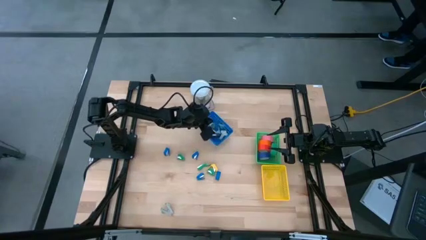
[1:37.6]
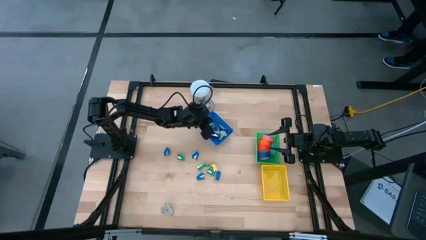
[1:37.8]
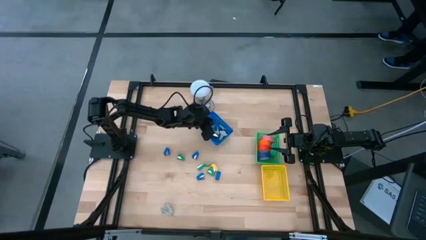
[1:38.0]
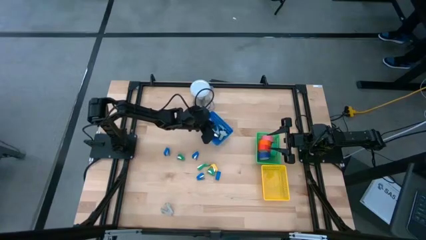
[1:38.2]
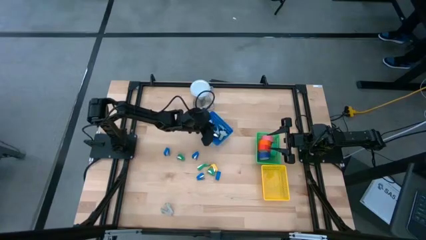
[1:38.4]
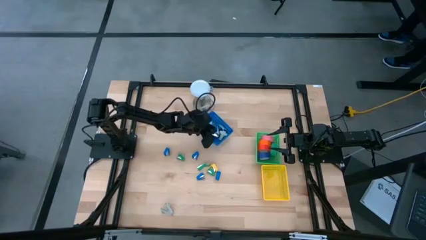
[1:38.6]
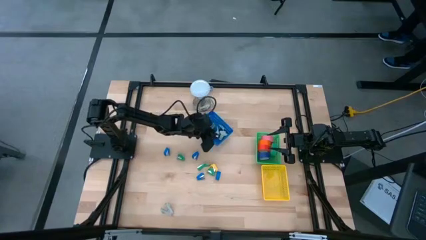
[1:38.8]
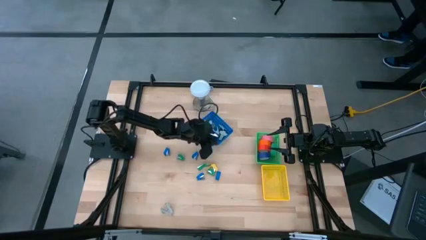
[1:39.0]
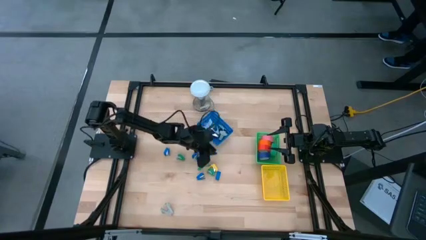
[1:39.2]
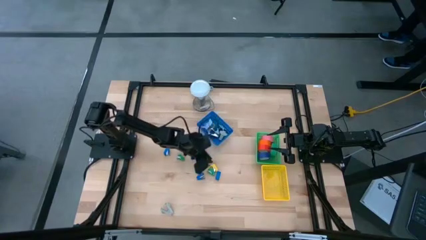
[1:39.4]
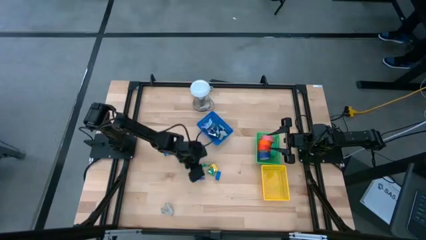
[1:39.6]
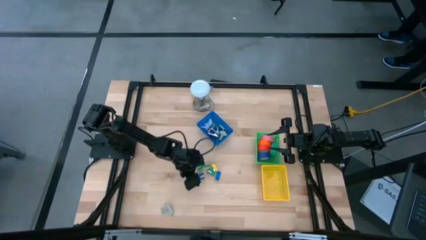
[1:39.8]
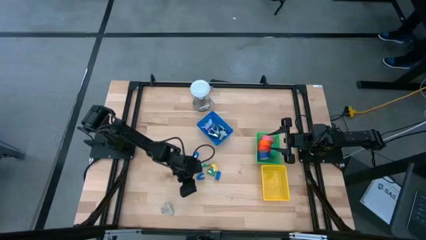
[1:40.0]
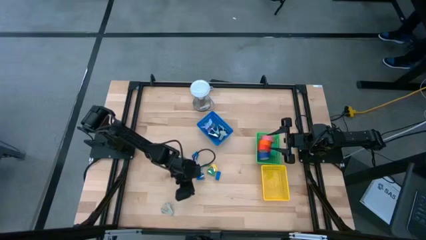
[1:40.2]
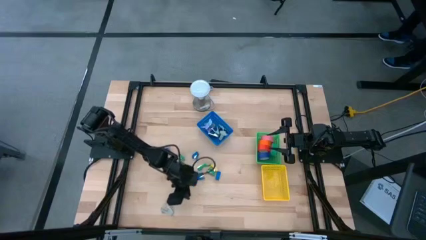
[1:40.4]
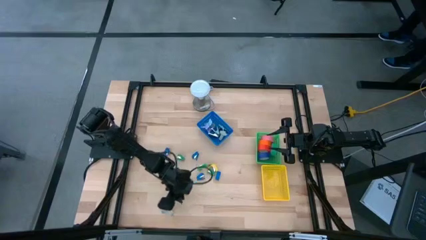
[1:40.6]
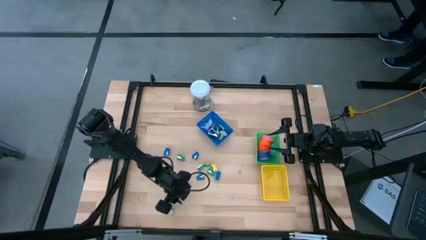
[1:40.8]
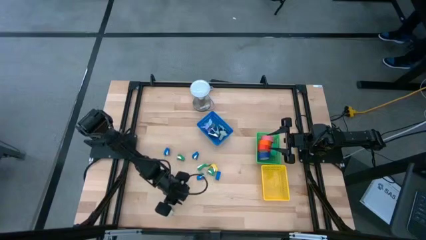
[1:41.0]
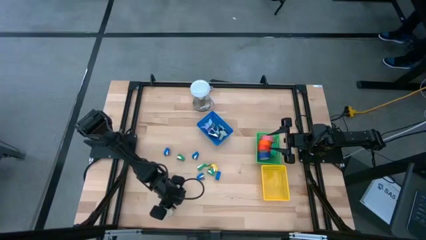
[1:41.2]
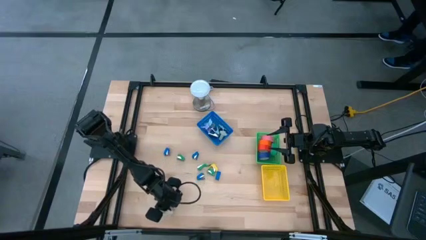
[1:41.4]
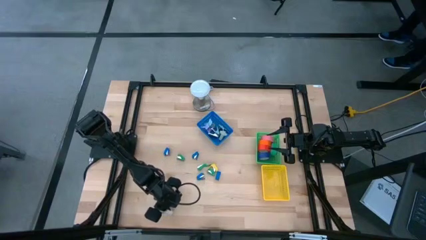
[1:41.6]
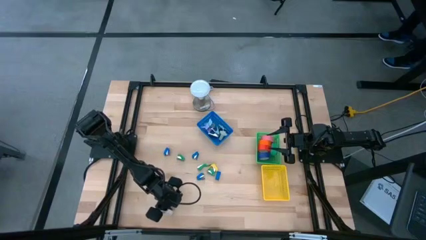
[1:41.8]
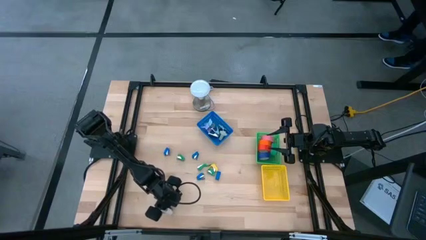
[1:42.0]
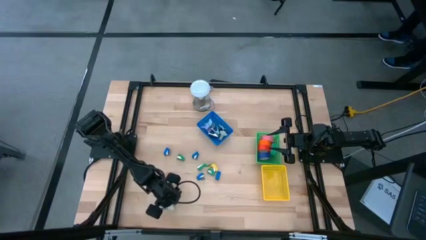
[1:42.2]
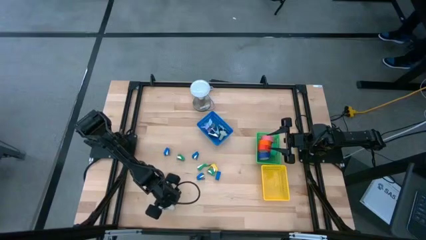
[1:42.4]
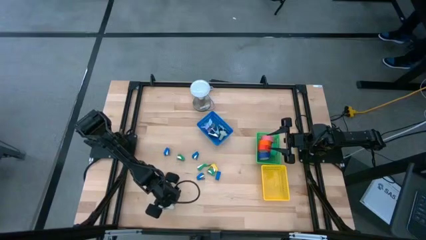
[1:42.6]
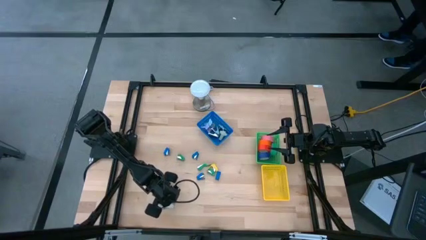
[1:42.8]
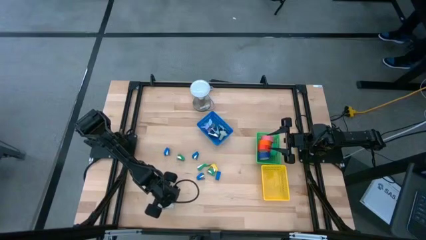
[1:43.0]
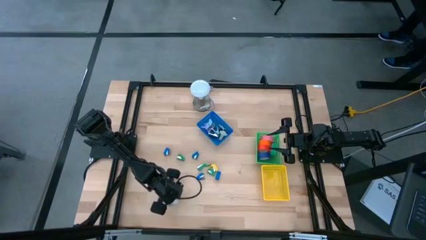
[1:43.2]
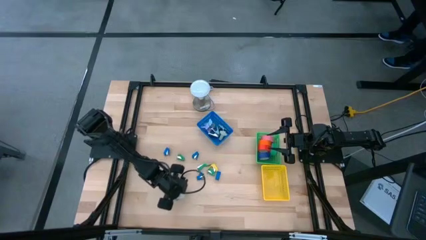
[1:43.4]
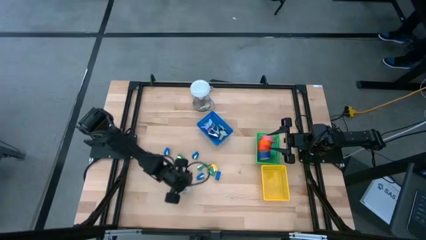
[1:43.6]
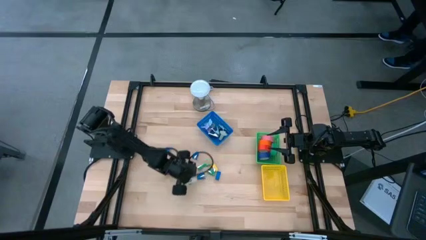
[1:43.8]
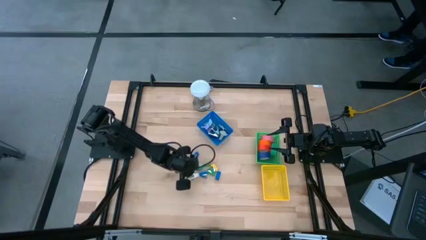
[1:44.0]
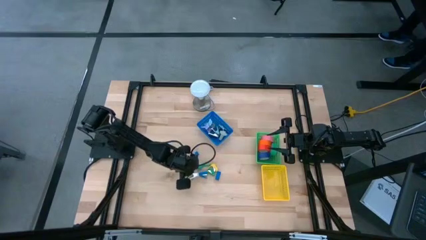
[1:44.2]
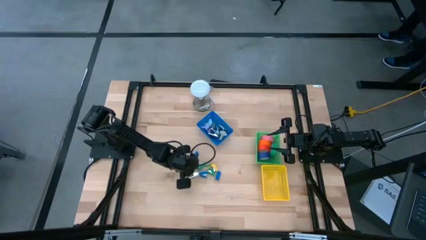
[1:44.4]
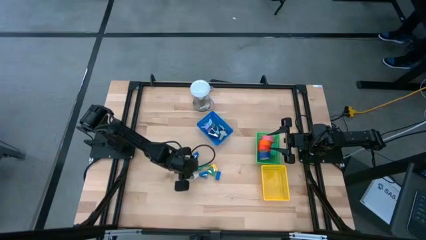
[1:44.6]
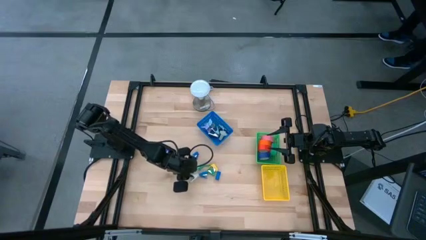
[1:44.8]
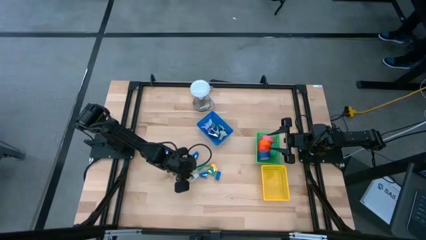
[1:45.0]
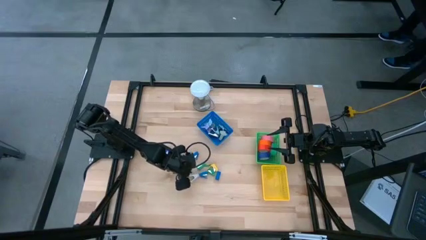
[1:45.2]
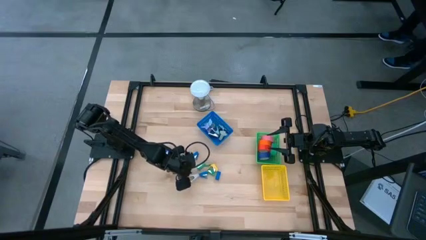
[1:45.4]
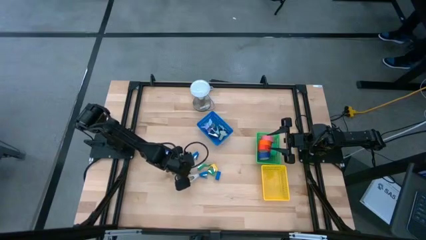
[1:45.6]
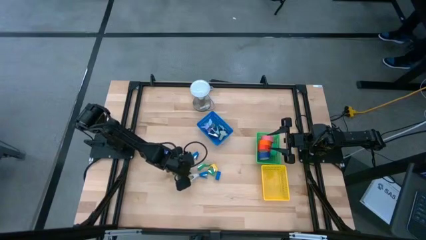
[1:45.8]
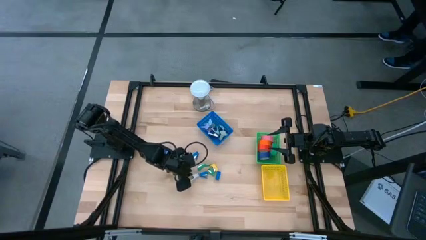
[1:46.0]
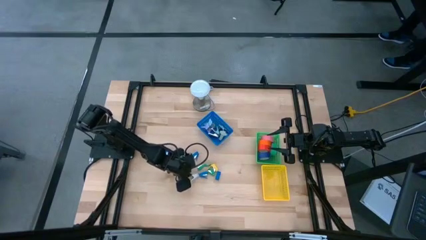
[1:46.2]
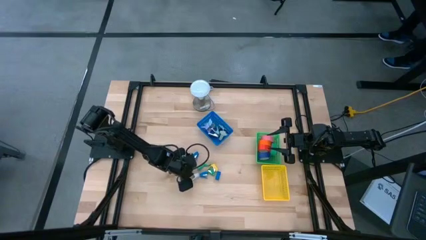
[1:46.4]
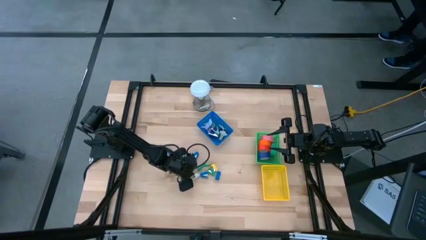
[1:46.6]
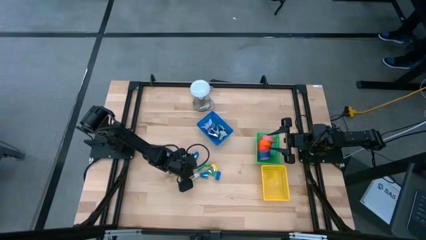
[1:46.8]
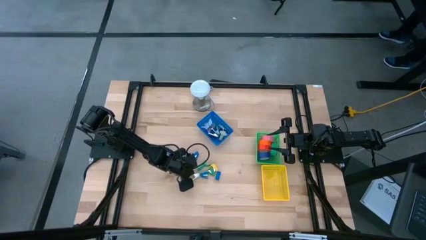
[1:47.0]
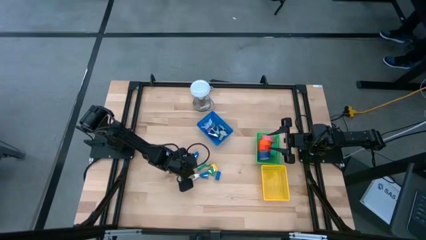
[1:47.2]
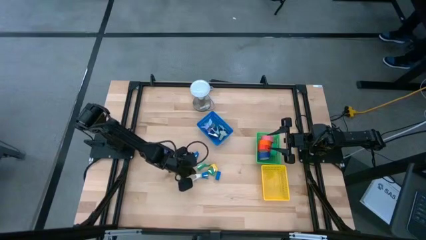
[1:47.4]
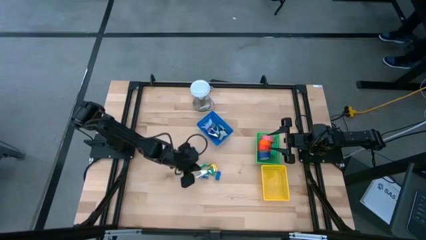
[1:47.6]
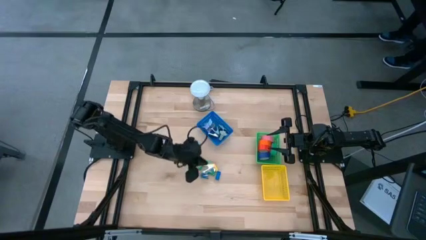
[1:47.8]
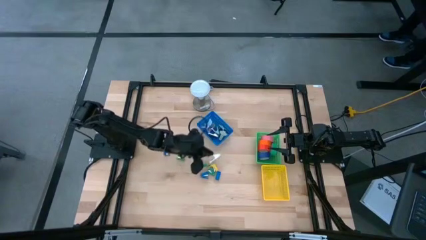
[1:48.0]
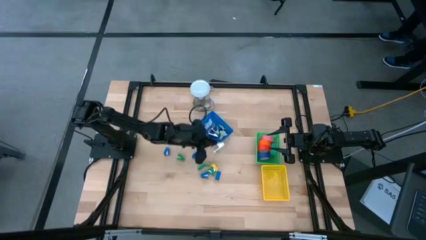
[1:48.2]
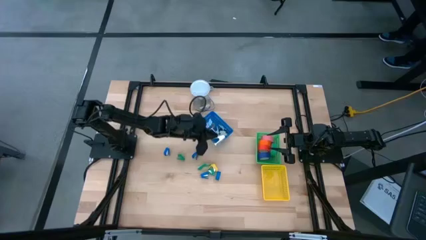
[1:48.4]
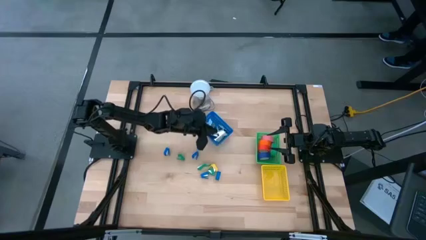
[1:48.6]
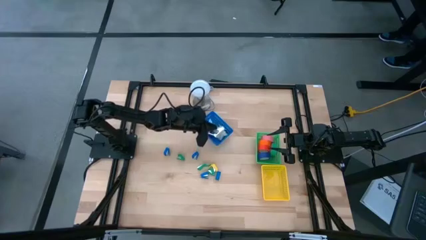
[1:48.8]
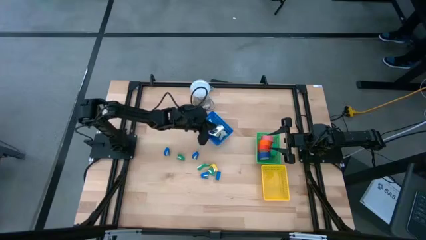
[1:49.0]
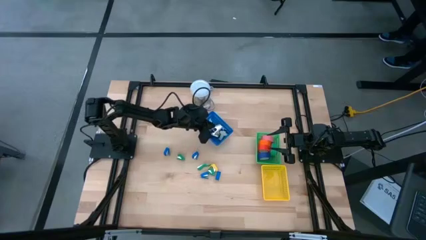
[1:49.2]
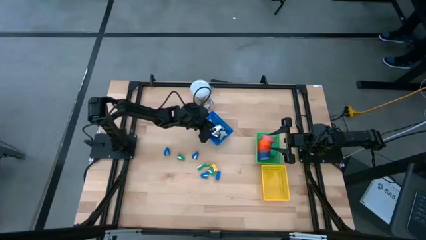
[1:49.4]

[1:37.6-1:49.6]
Task: Pick and place Stapler, Stapler remover, tape
Put the light gray stapler remover into the blue bin

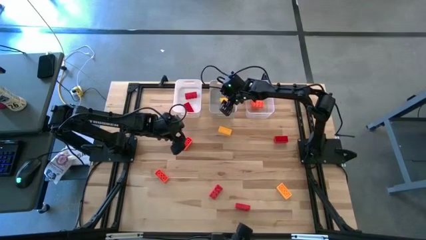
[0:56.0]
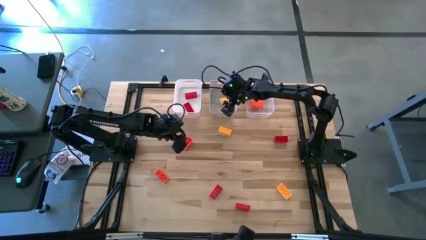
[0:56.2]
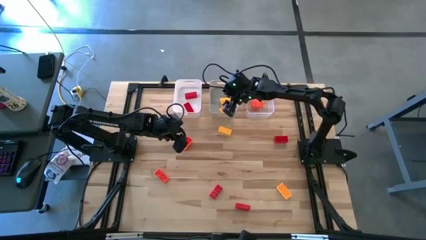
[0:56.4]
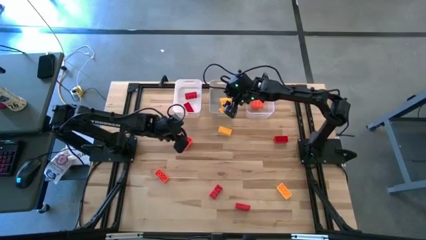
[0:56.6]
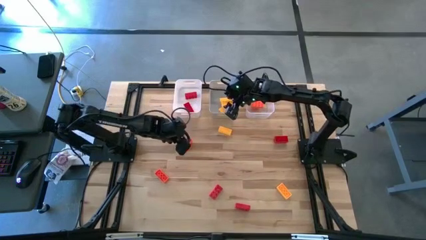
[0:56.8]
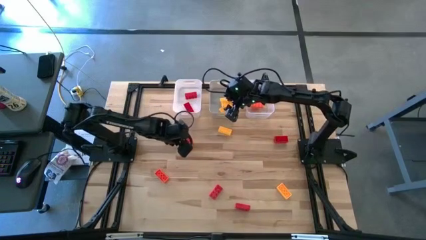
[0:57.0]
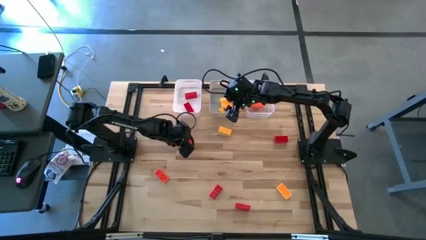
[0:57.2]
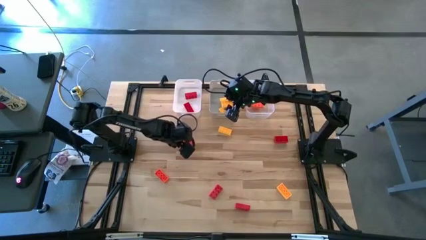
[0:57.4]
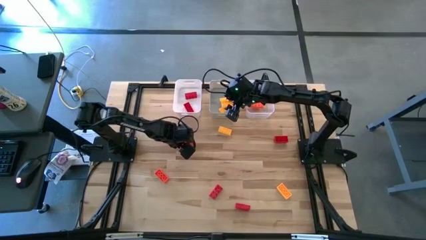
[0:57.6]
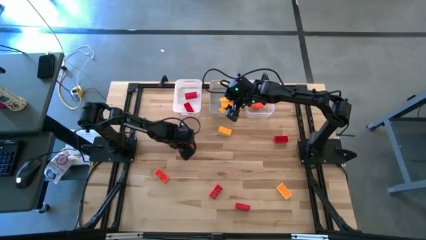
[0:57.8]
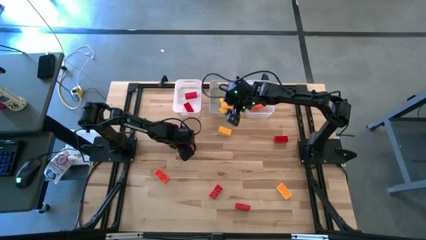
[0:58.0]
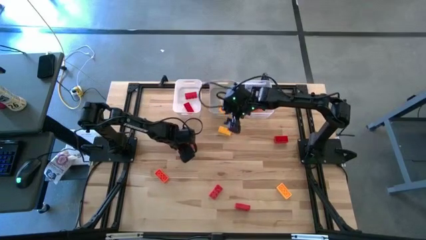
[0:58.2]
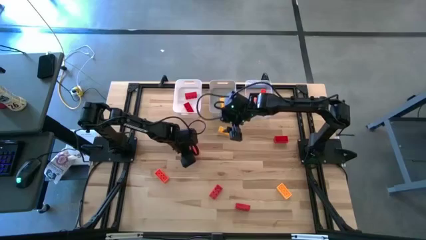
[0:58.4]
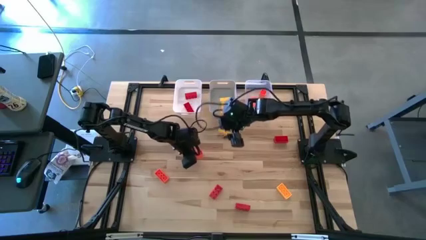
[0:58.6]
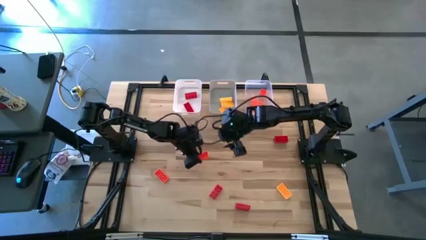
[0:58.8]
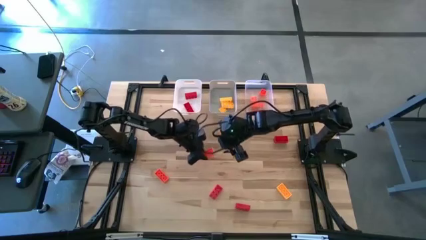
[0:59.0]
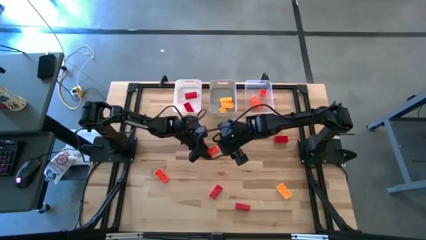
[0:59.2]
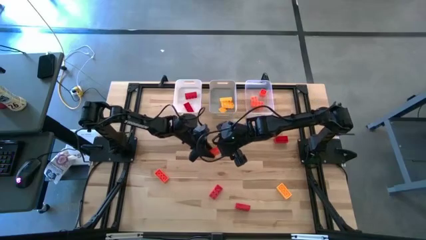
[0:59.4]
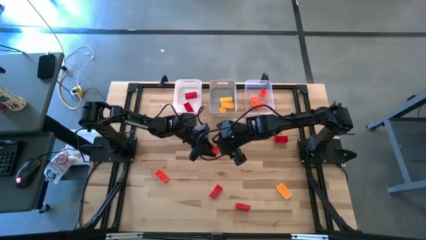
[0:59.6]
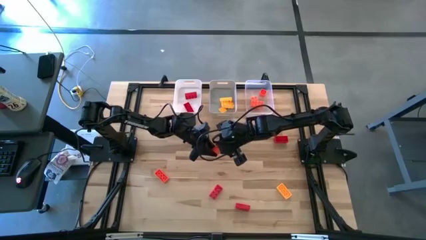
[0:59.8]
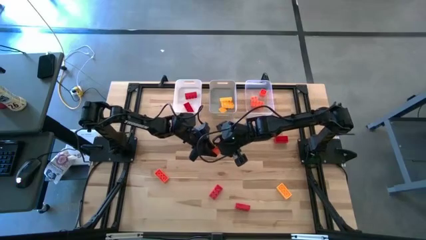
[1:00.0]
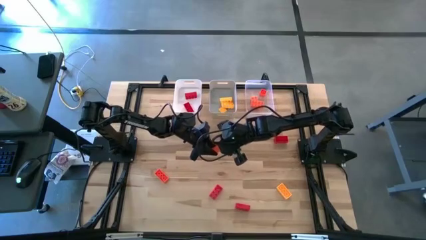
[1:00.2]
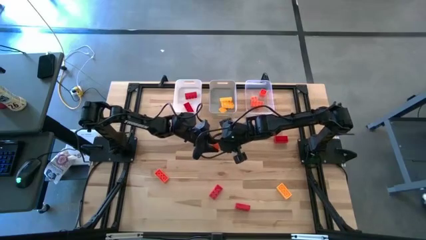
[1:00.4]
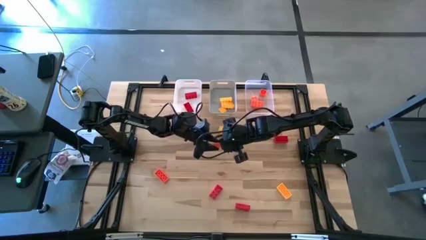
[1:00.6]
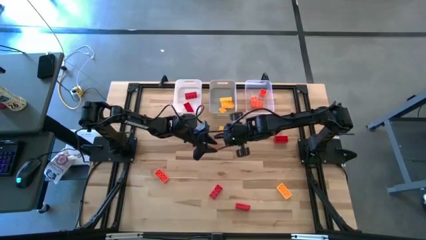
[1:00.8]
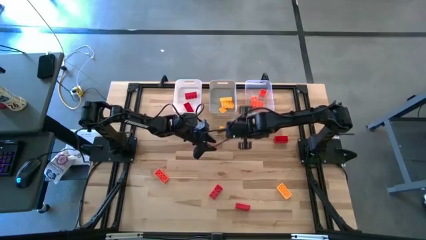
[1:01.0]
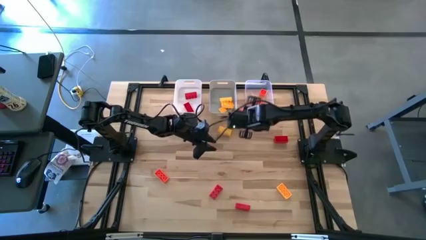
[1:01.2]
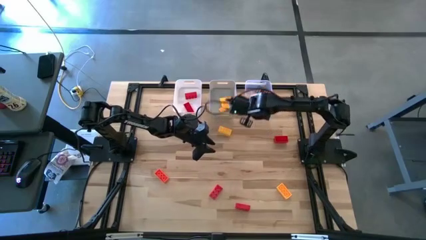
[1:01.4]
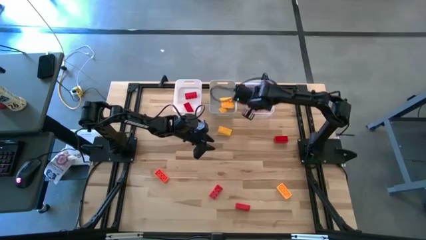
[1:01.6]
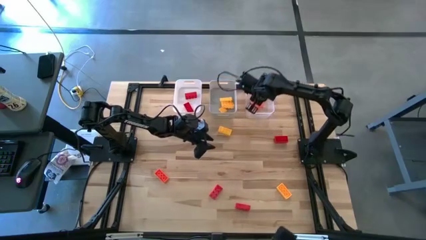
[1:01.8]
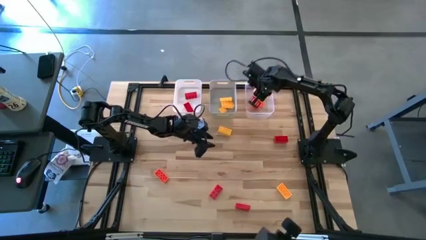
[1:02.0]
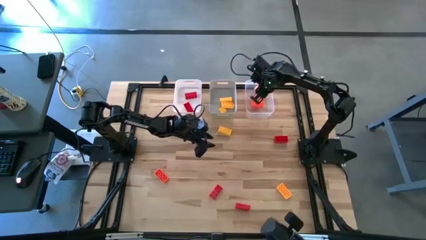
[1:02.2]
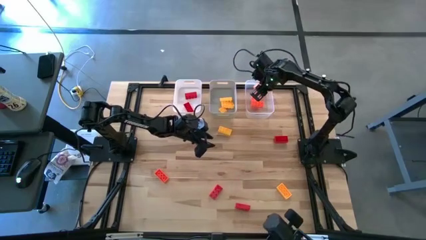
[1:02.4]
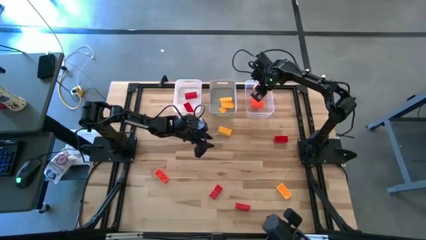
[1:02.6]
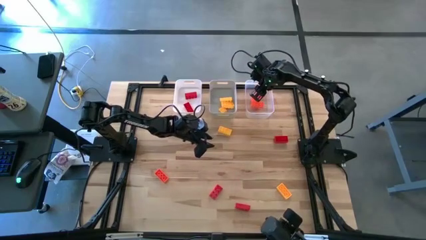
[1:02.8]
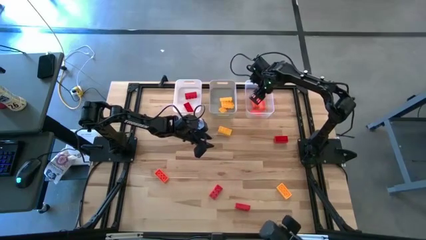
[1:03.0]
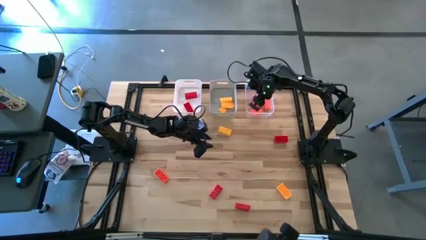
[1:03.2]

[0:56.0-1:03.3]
Task: Sort & place blocks by color
Put the orange game piece into the transparent bin
